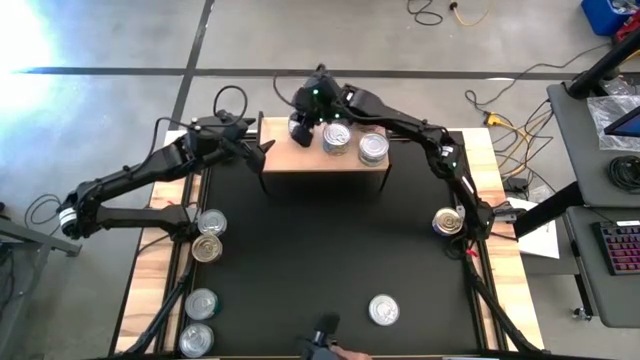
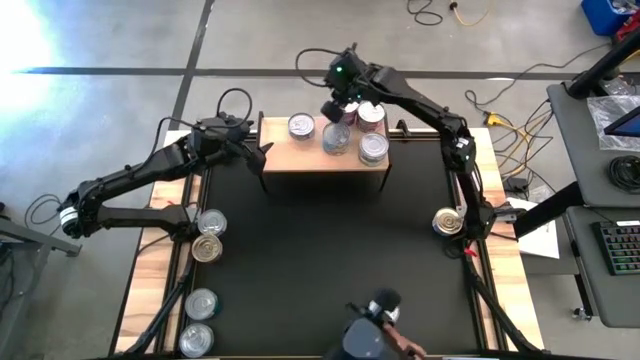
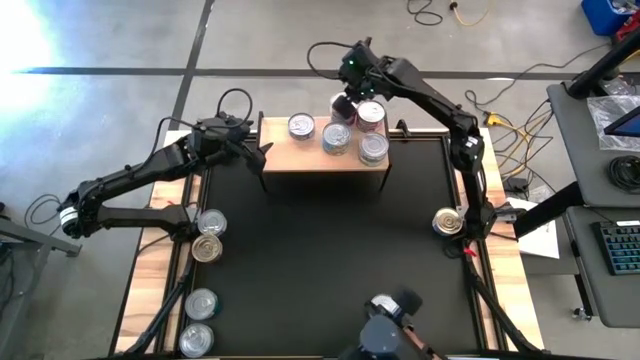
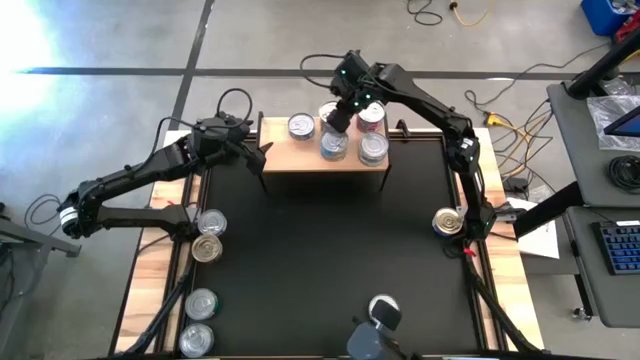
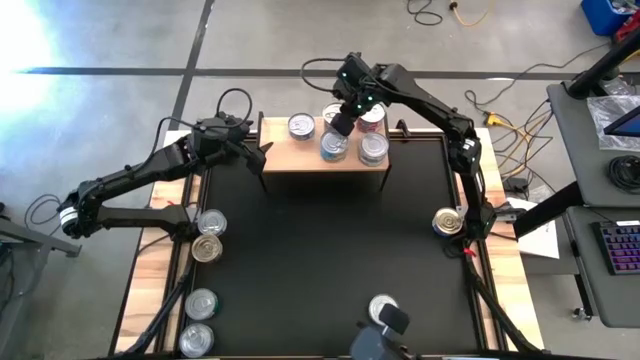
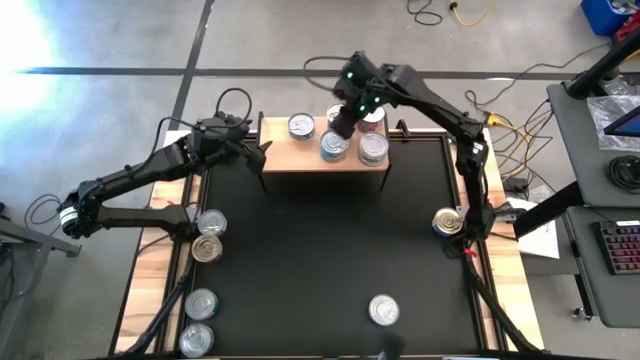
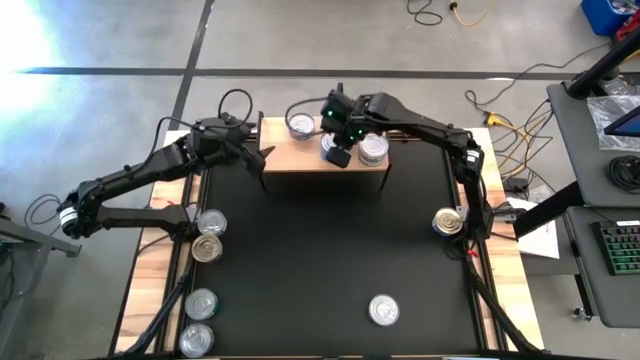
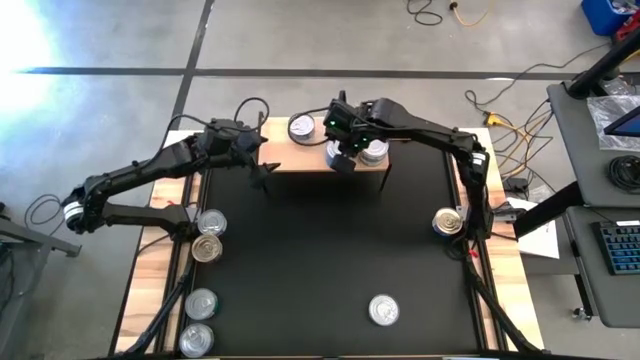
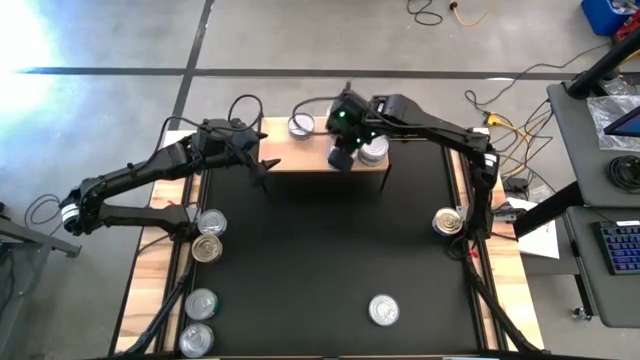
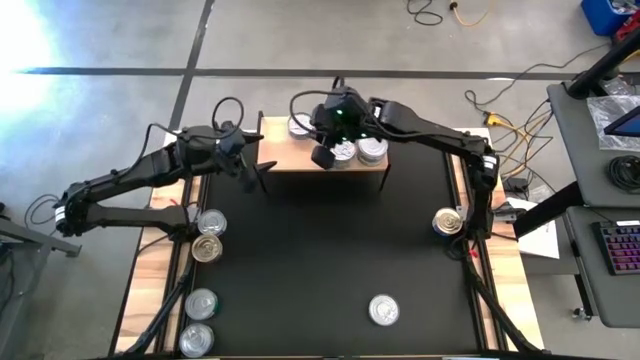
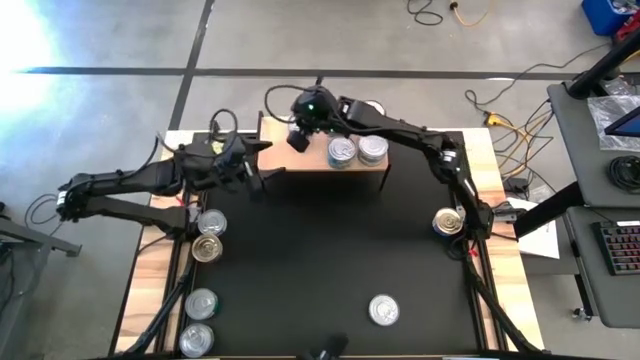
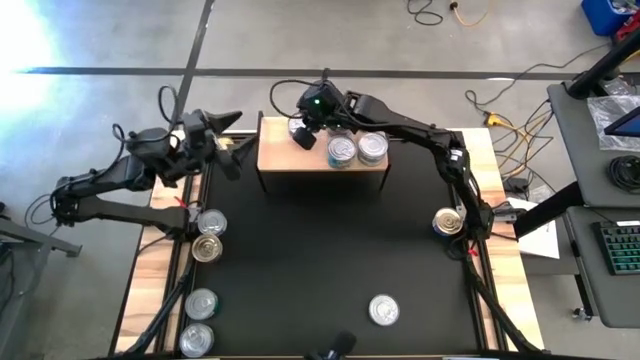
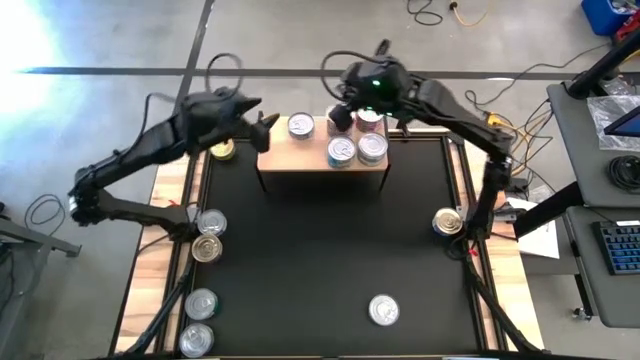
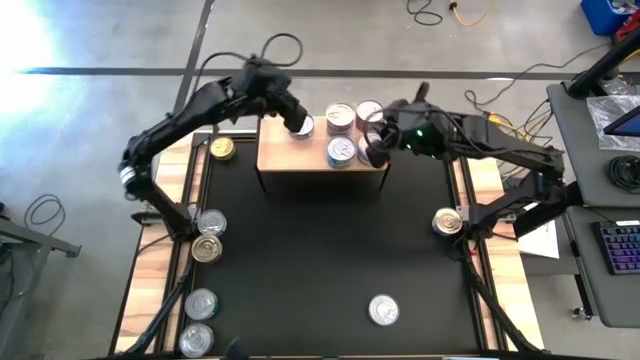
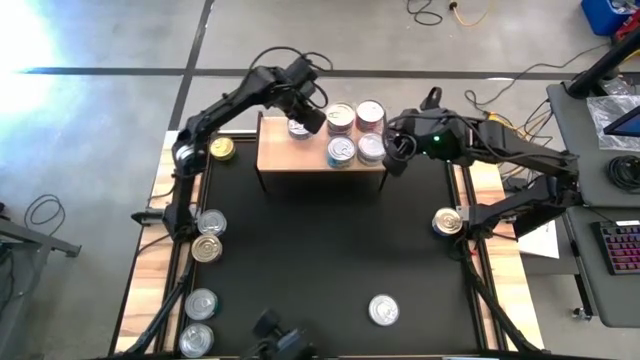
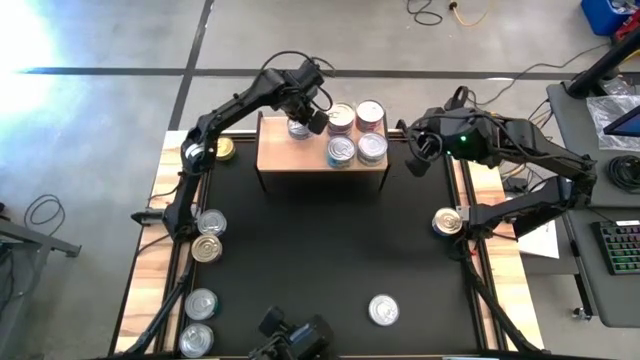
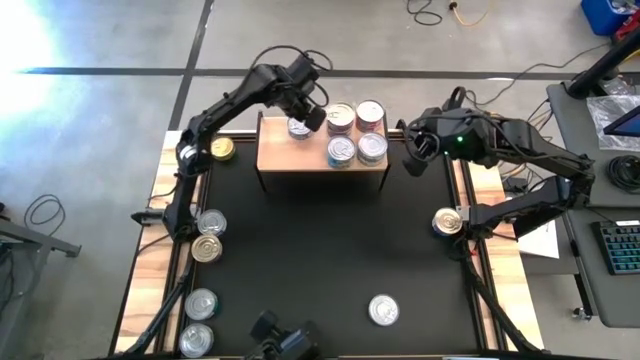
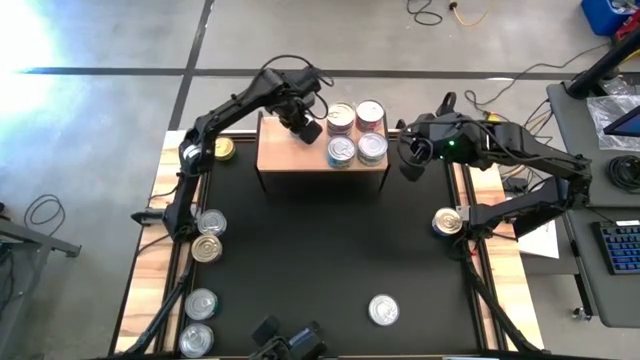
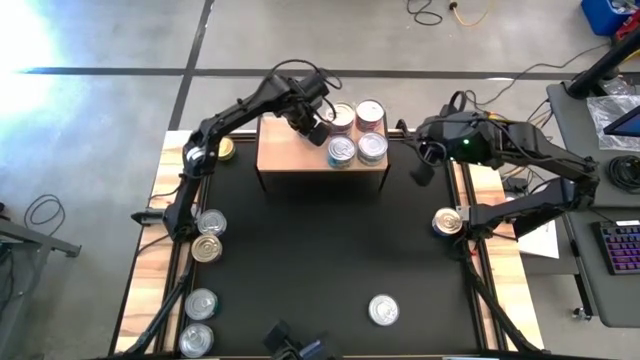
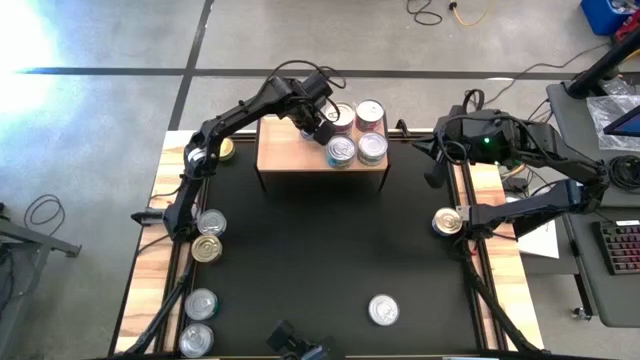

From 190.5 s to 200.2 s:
Task: Stack canned seafood by type on shelf
Adjust the tuna cans on the shelf

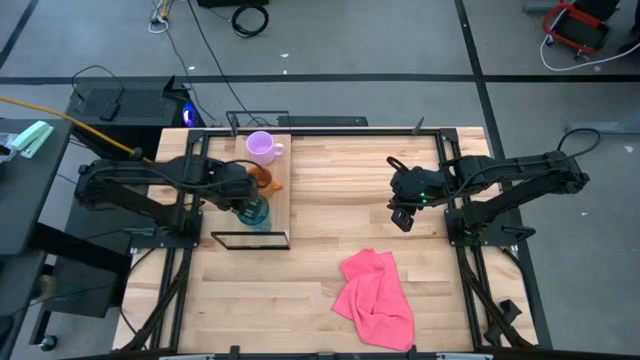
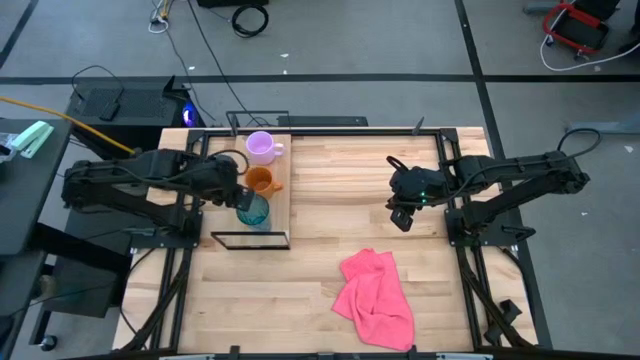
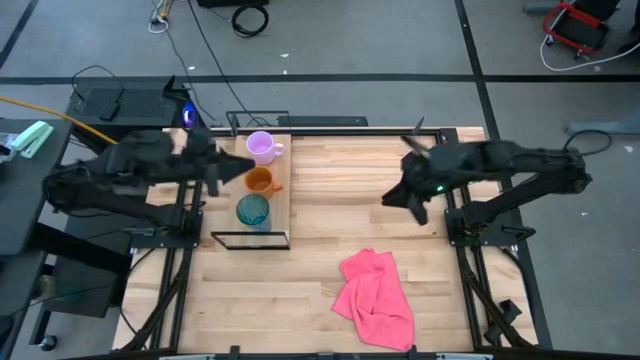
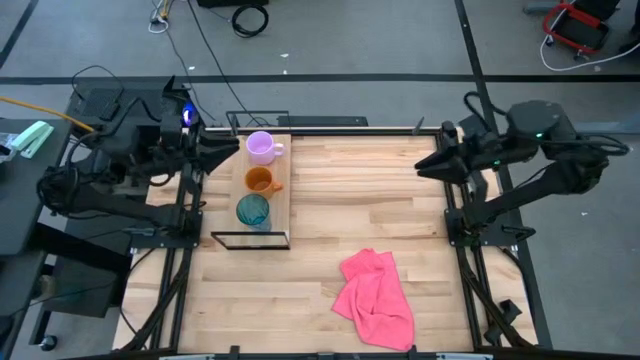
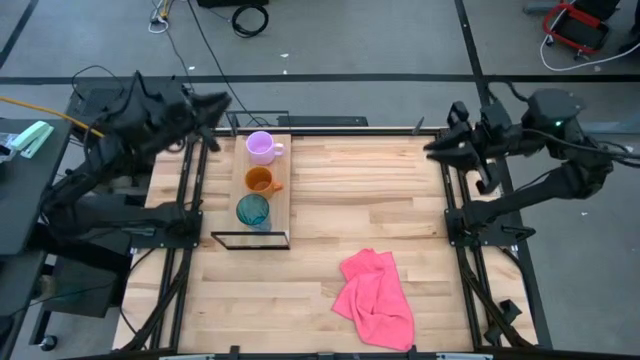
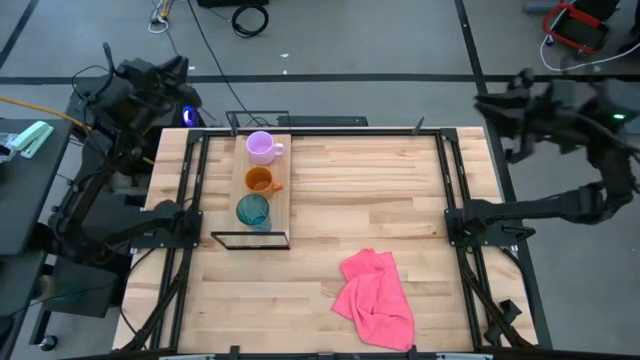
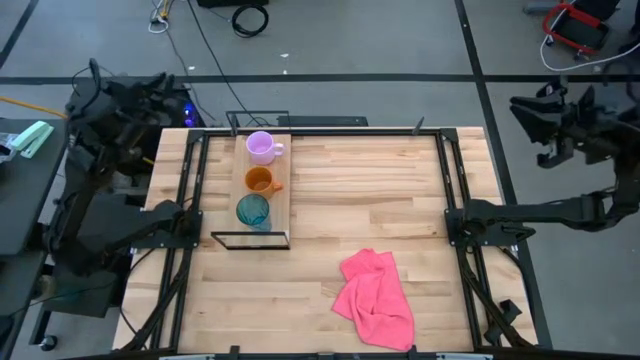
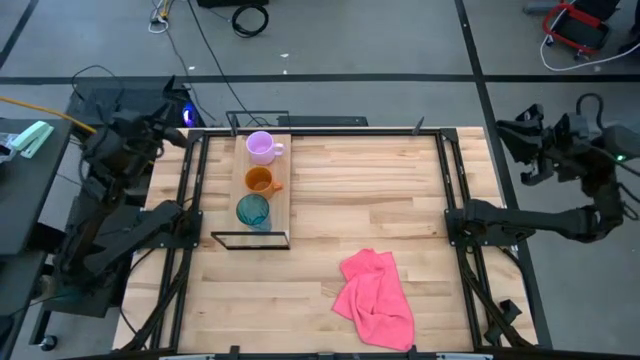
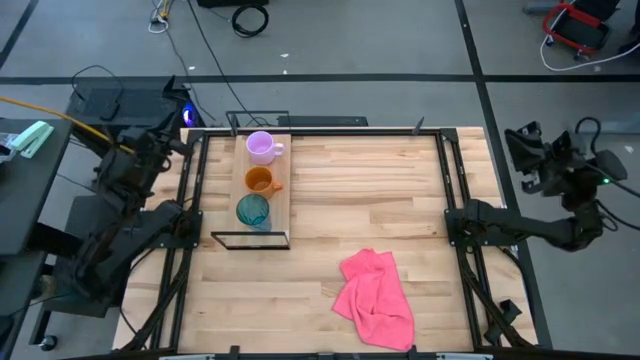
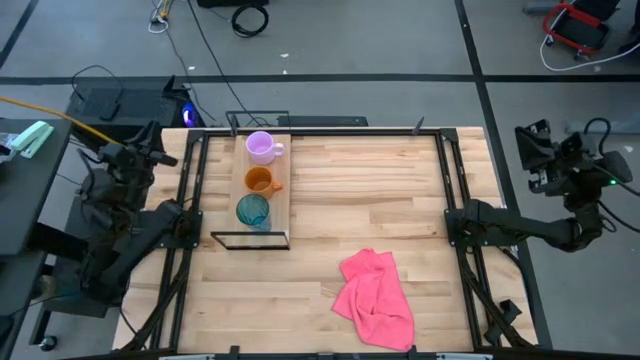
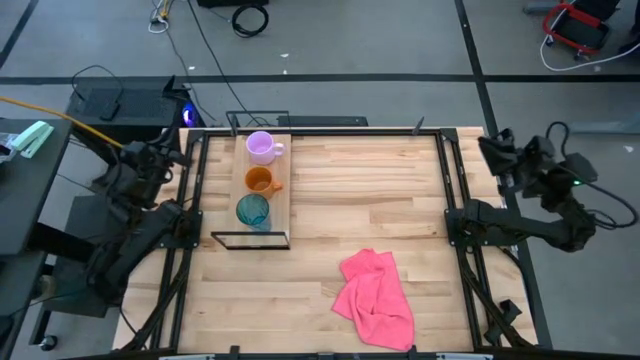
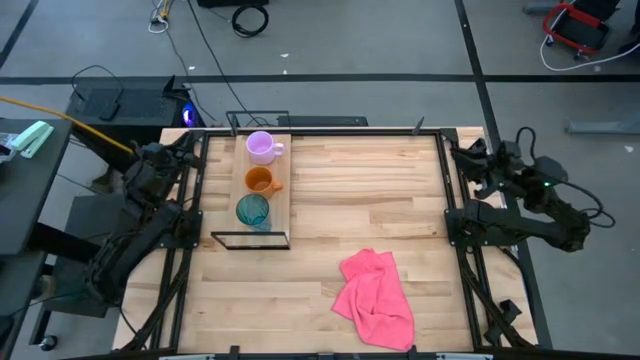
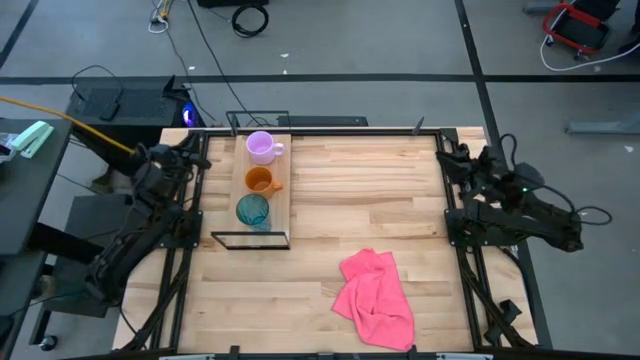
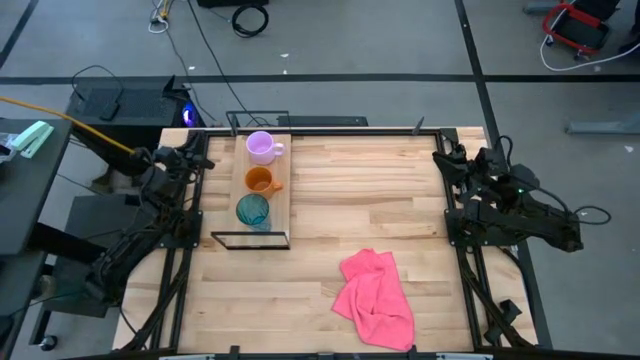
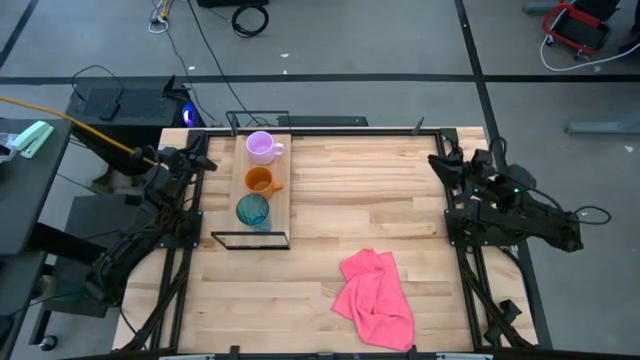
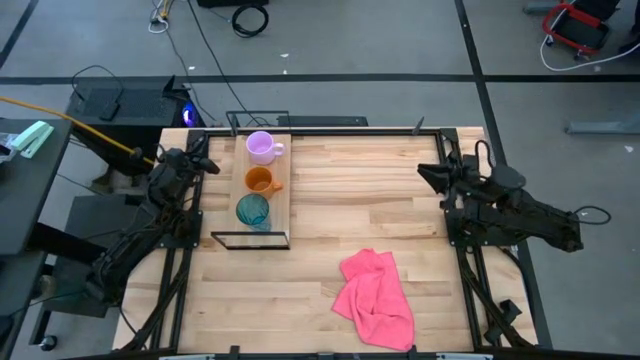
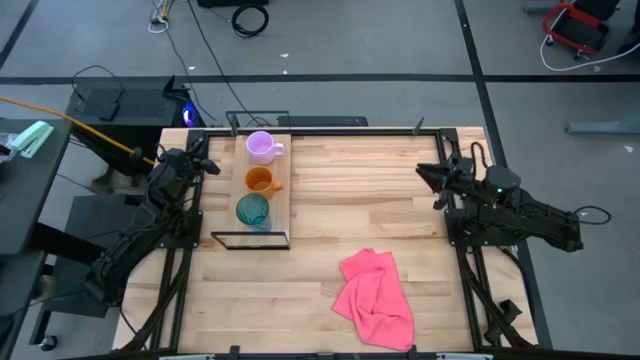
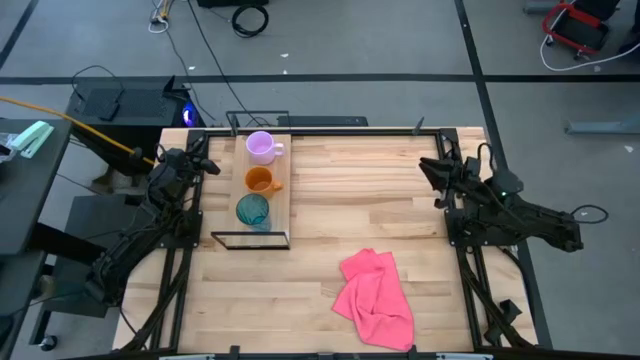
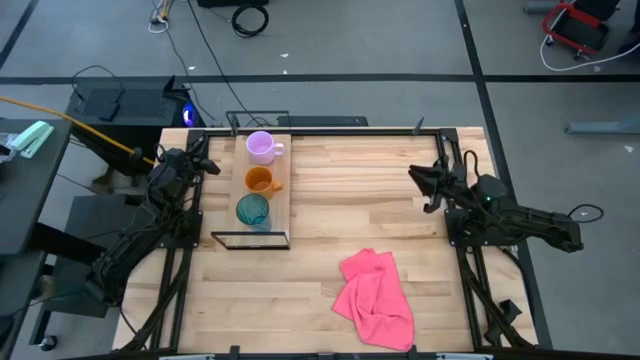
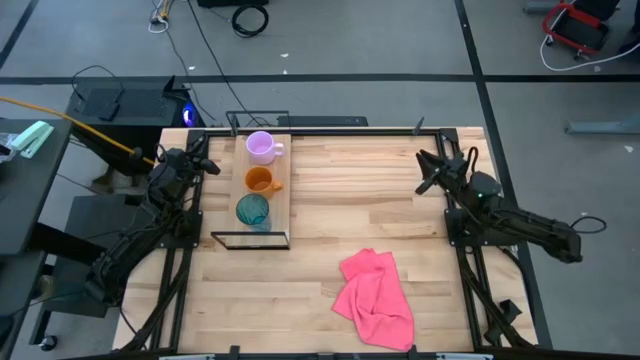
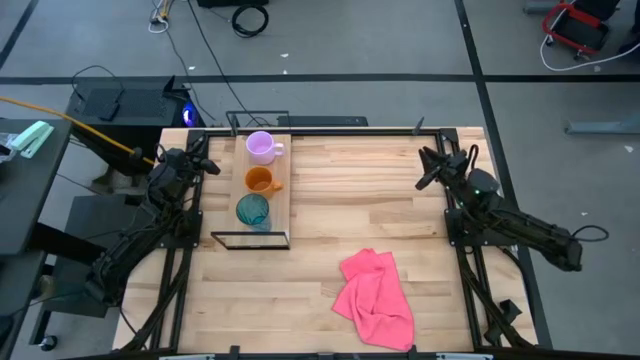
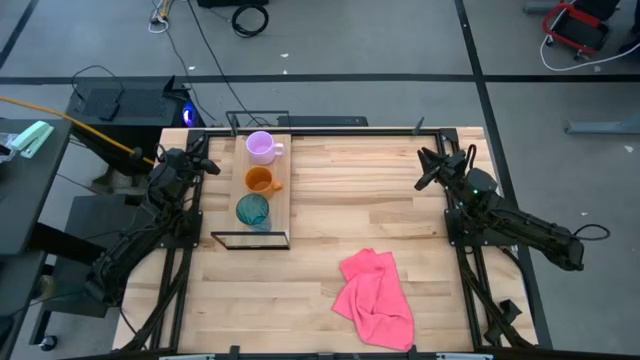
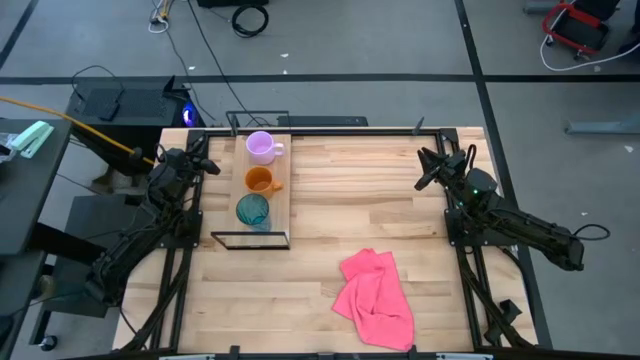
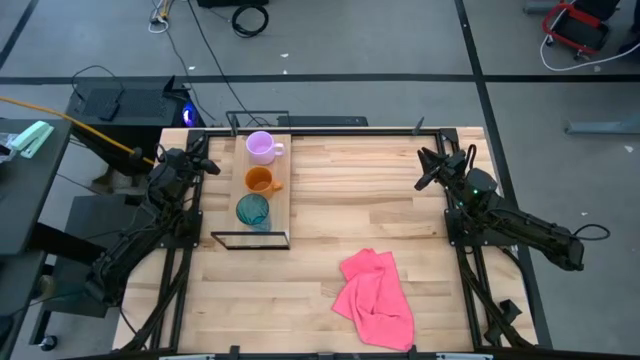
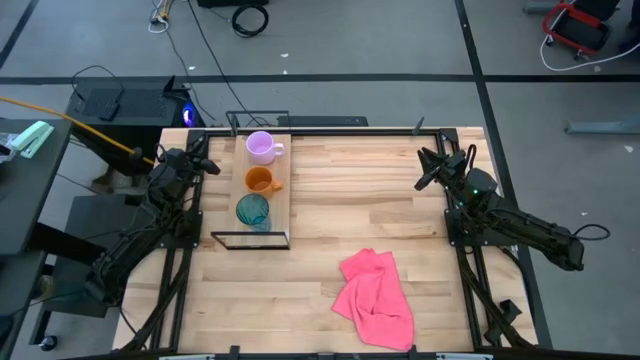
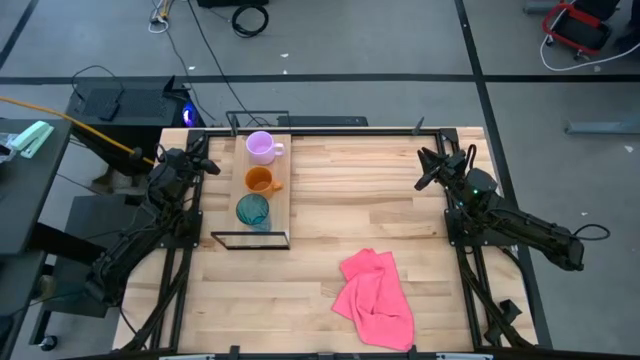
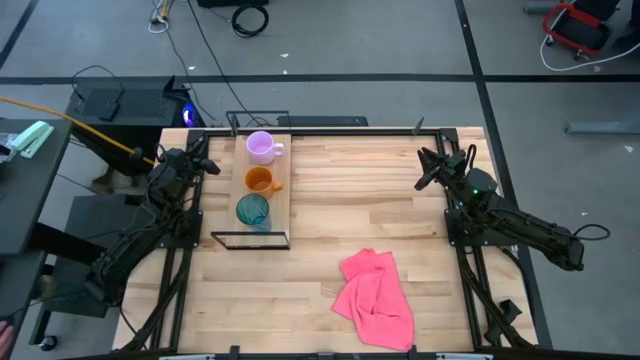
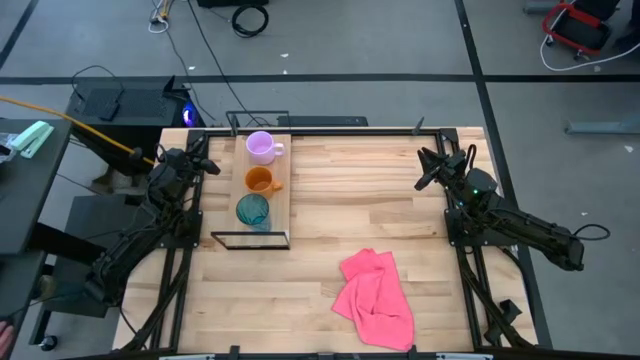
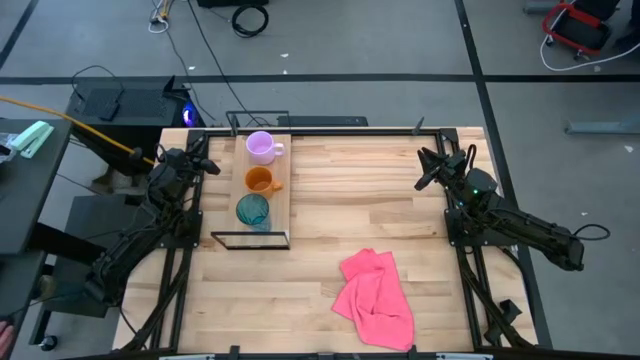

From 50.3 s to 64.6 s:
Task: Stack small to large cups/mugs on shelf
Return to Home Position
